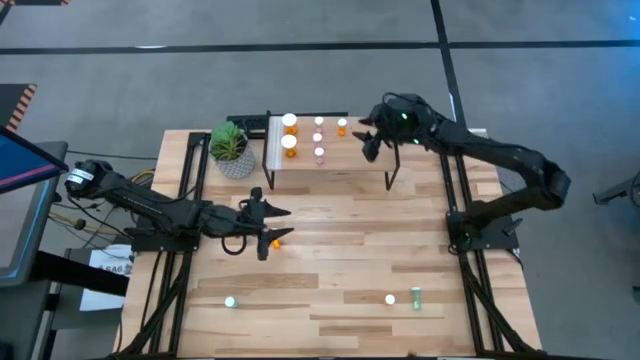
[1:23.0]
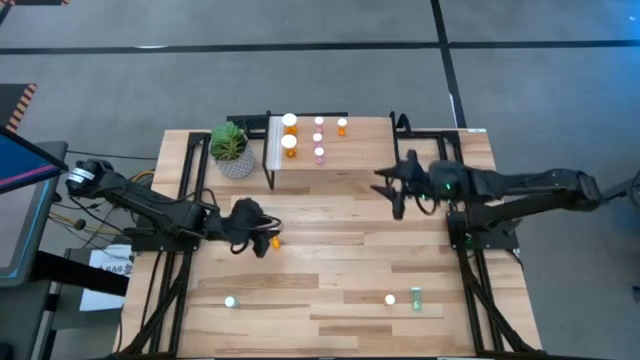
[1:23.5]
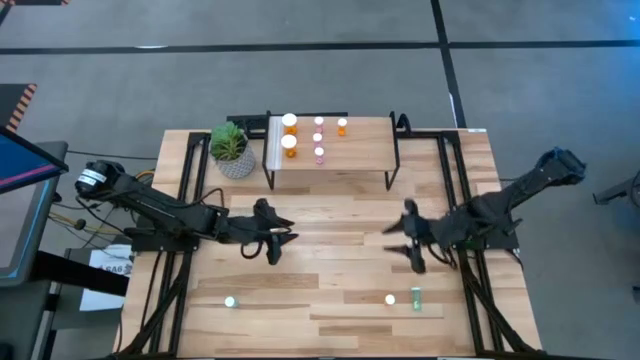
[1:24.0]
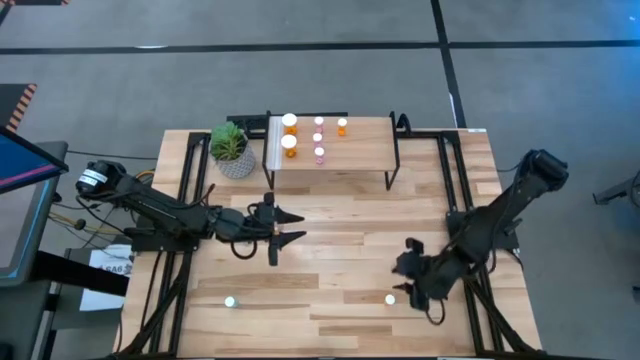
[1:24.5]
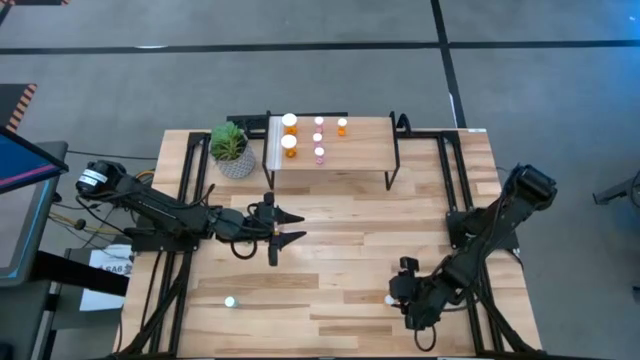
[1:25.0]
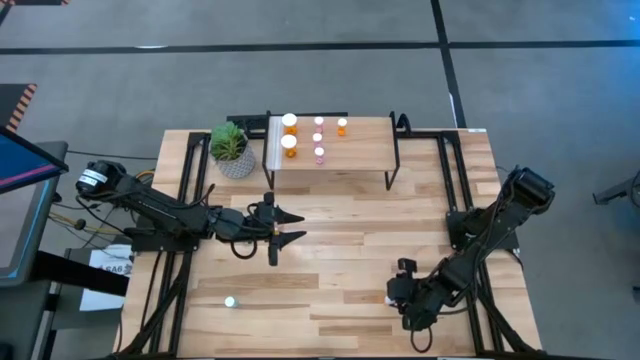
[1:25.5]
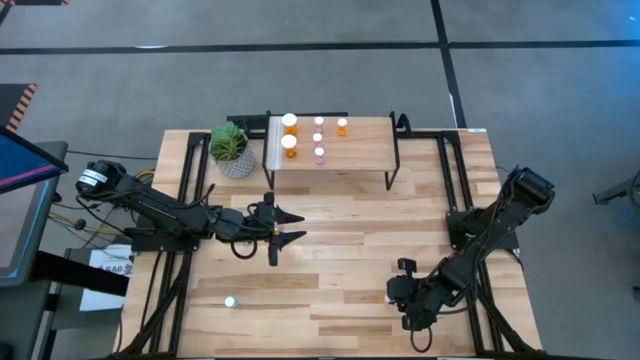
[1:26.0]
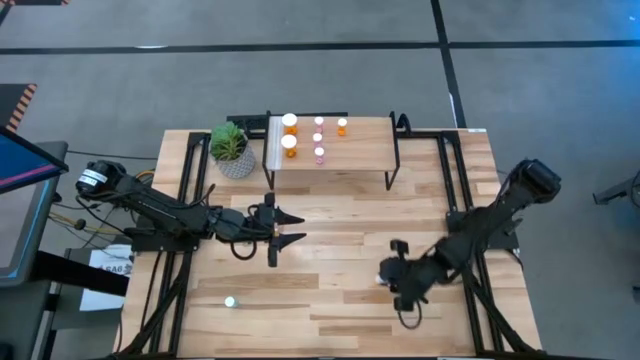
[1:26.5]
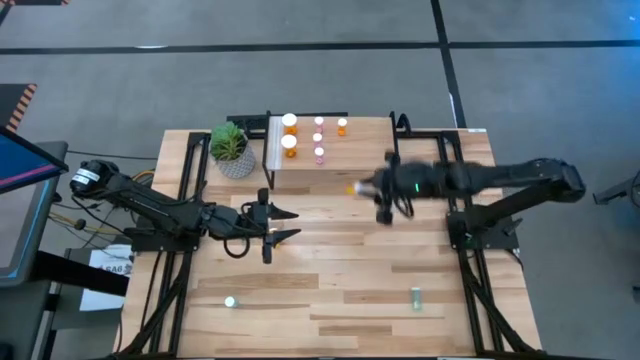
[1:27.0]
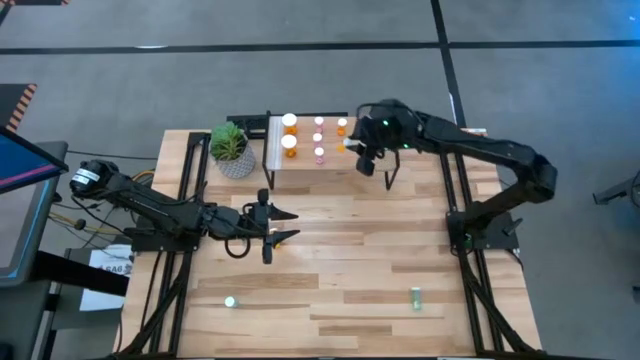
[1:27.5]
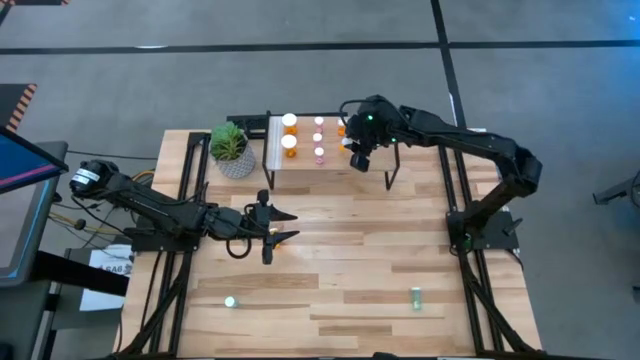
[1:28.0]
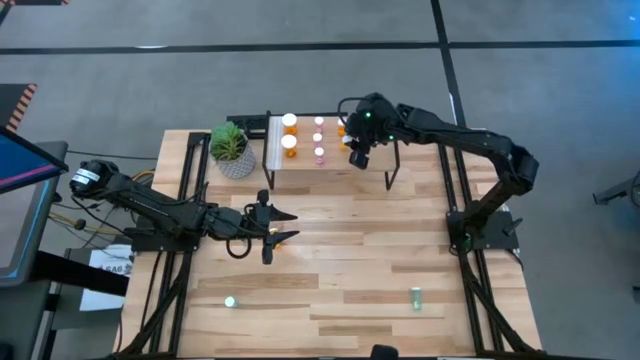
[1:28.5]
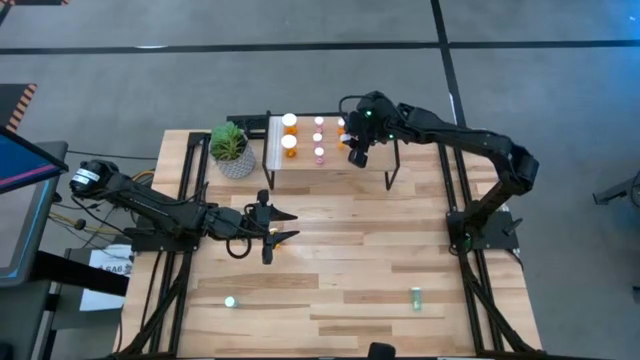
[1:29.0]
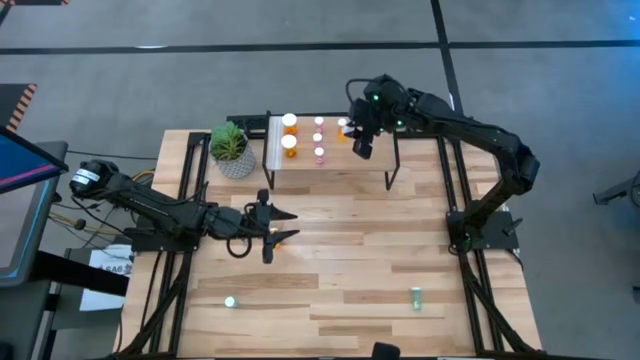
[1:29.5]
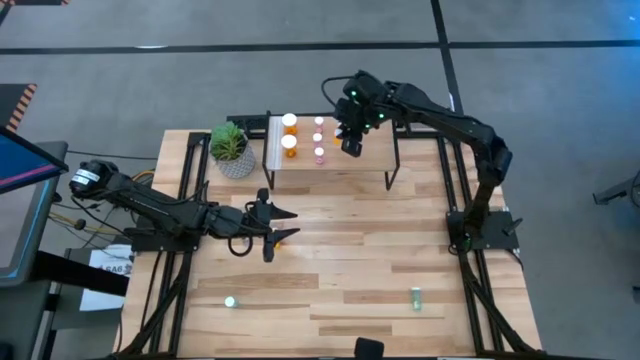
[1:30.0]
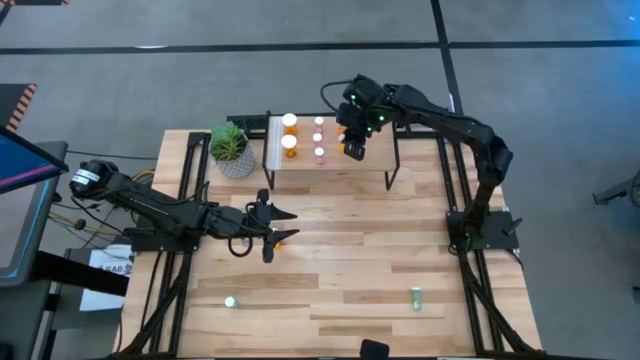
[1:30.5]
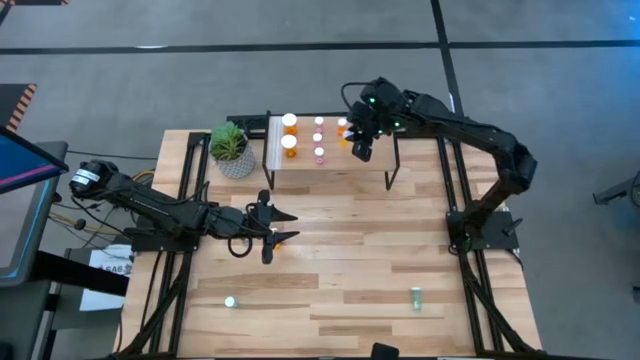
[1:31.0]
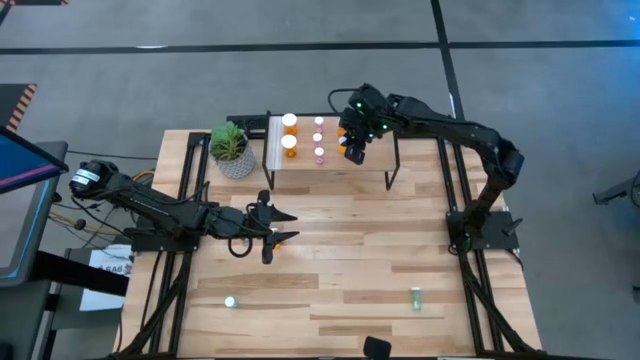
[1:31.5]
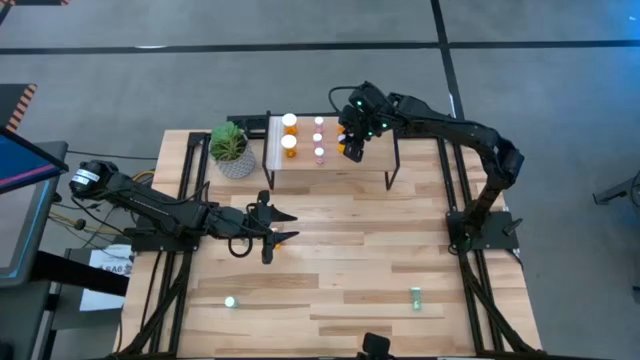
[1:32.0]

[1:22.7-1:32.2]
Task: Pick and place medicine bottles onto shelf by color
Put the small bottom orange pill bottle aligned with the other small orange pill bottle on the shelf

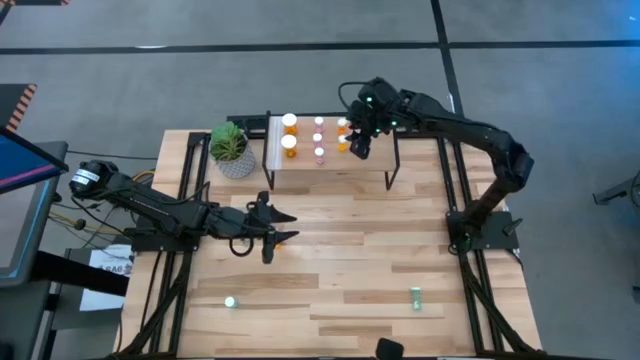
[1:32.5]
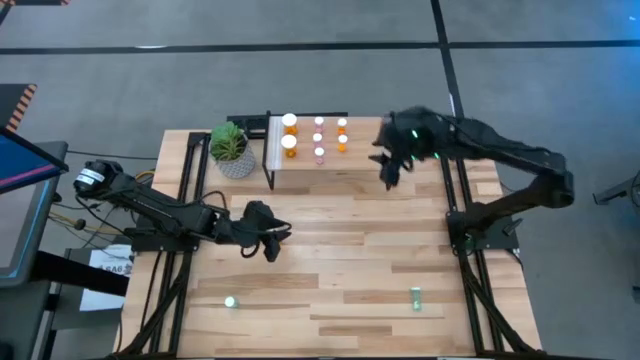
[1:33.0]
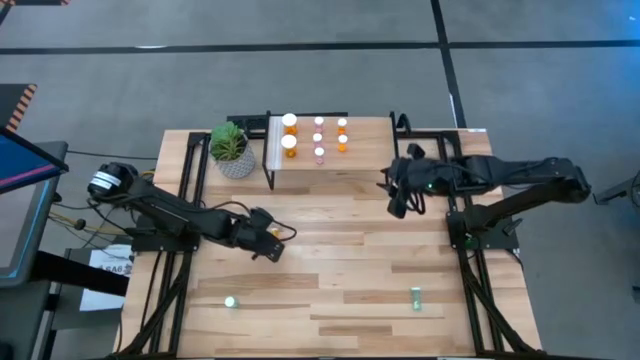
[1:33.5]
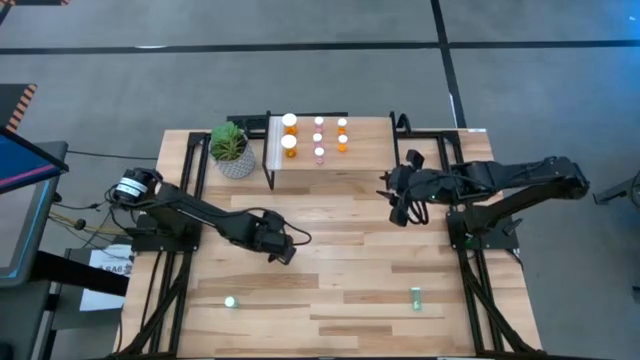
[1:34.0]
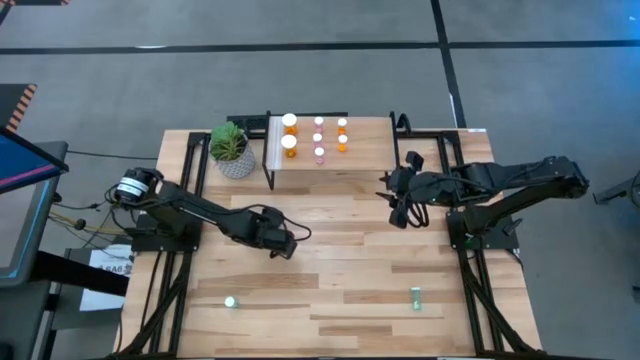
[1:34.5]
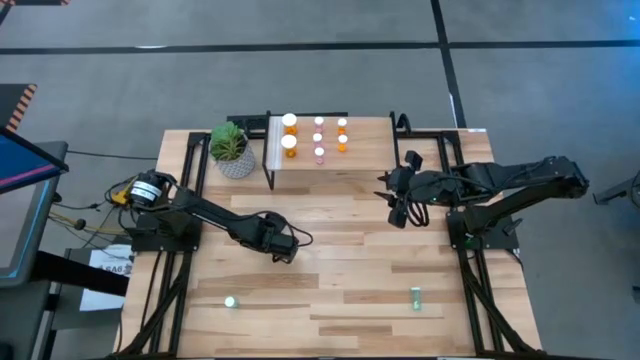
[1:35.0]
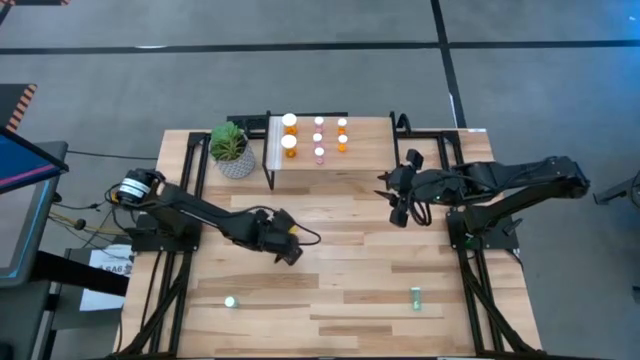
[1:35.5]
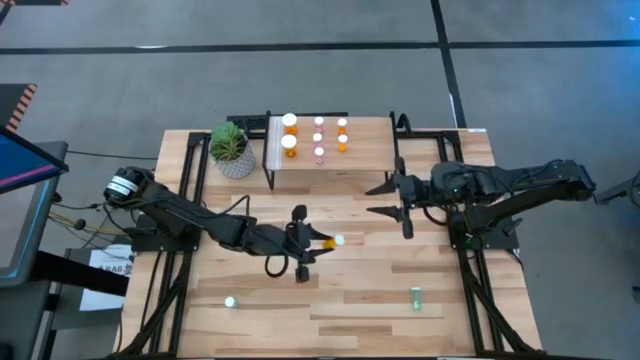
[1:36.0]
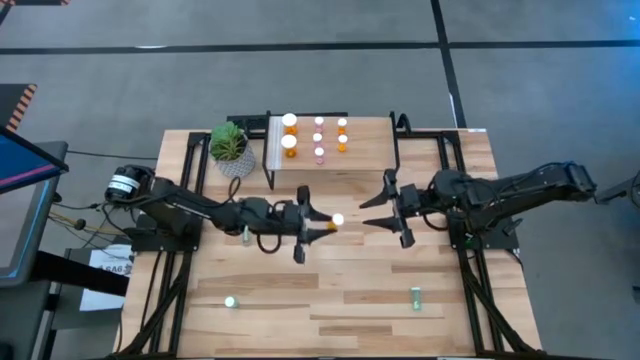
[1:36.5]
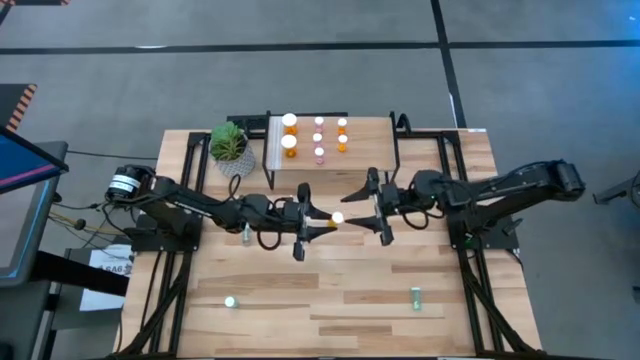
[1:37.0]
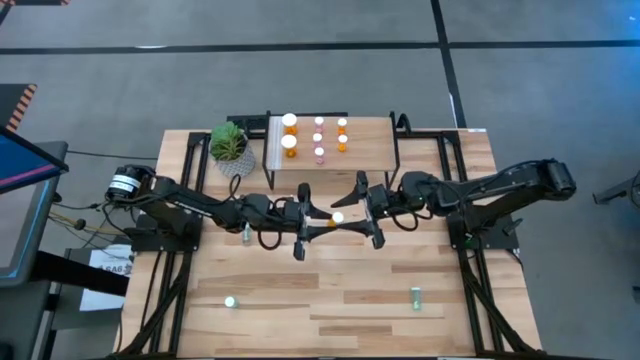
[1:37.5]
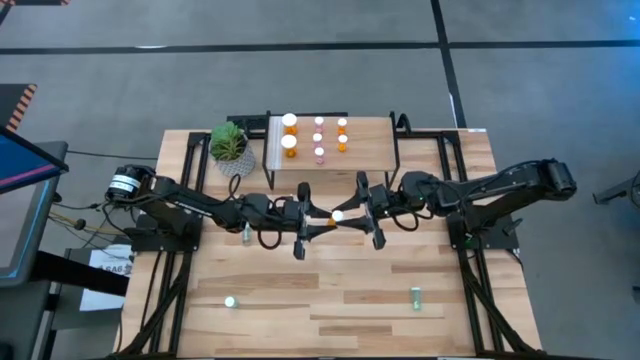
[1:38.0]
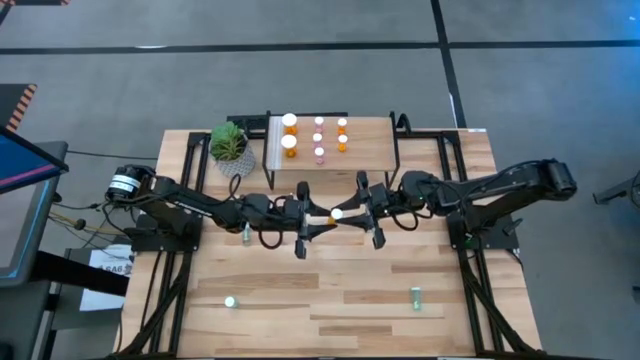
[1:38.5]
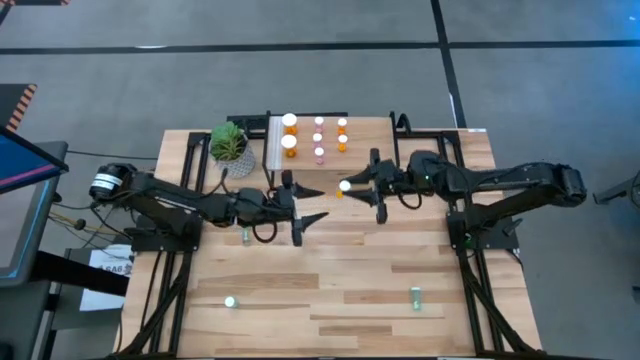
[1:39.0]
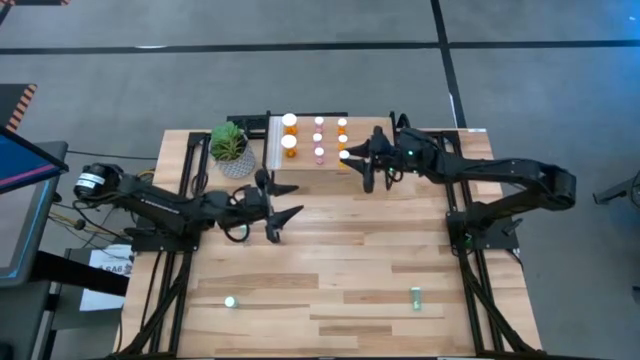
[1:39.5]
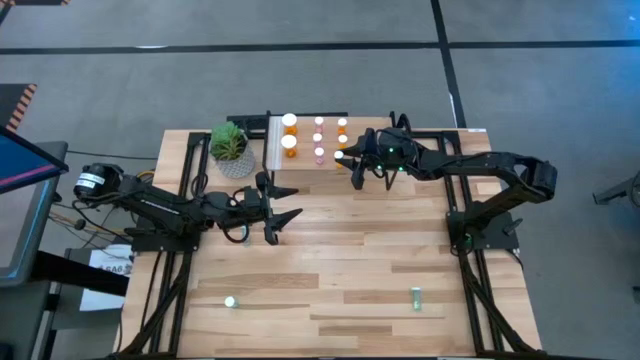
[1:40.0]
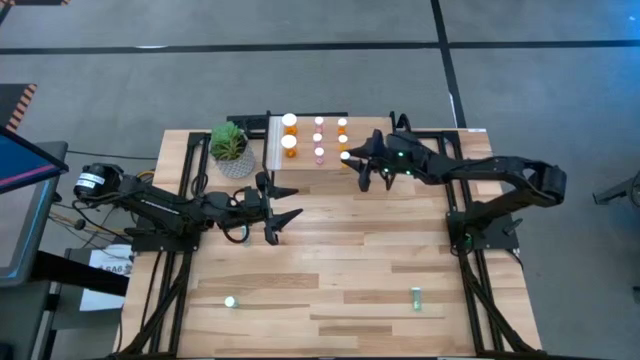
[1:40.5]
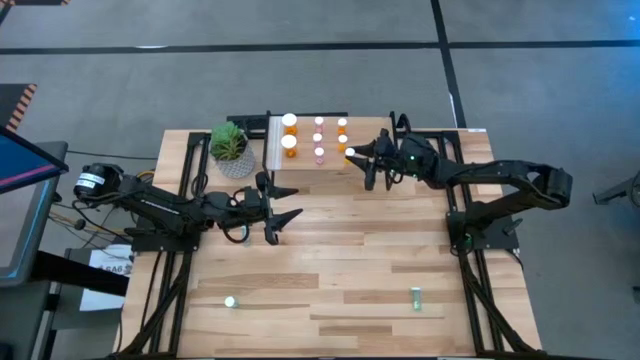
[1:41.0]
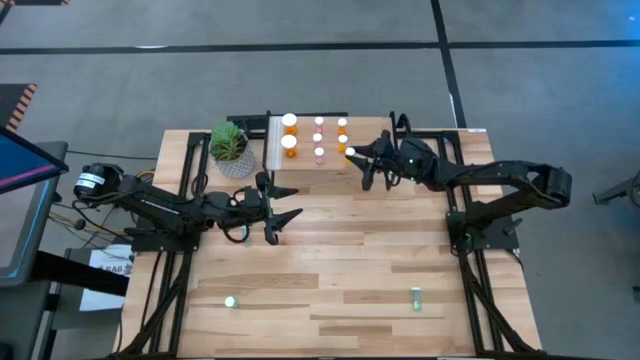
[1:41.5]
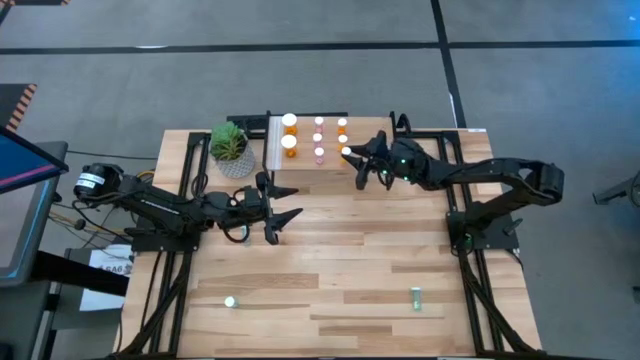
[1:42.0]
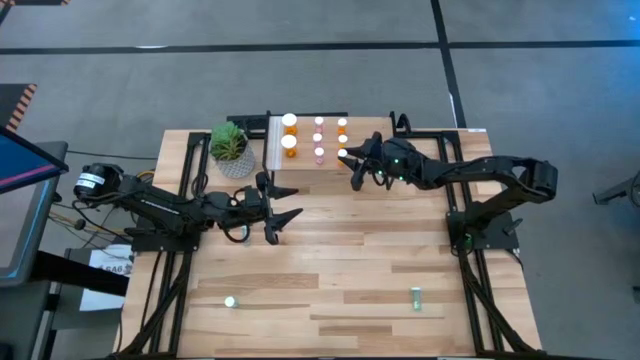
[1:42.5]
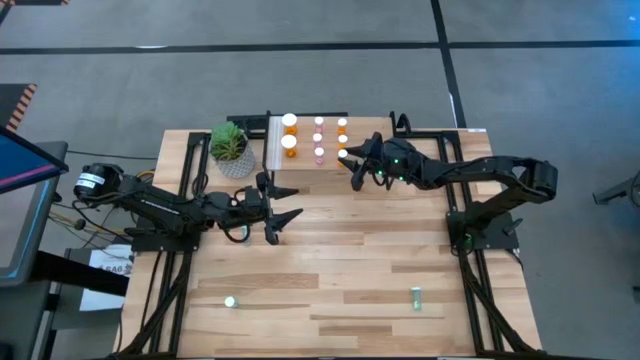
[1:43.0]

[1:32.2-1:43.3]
Put the small orange pill bottle aligned with the other small orange pill bottle on the shelf

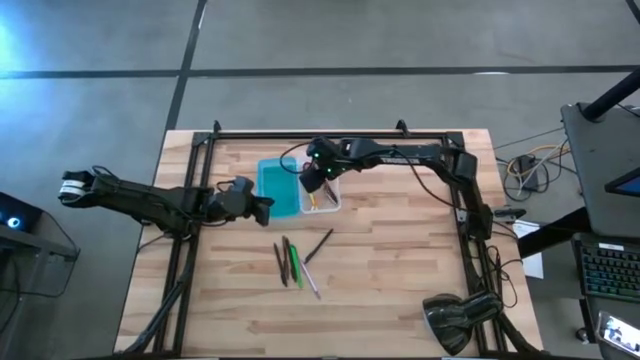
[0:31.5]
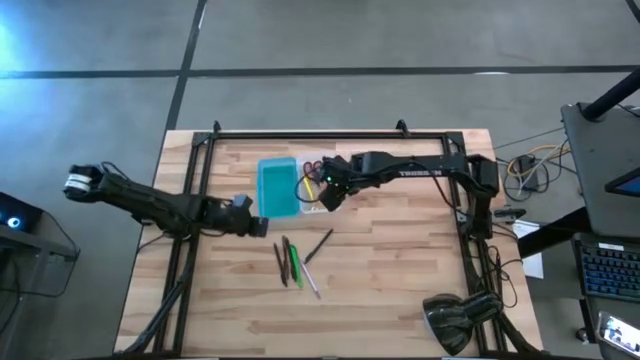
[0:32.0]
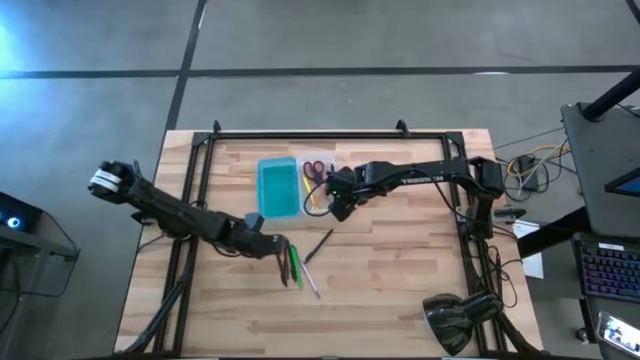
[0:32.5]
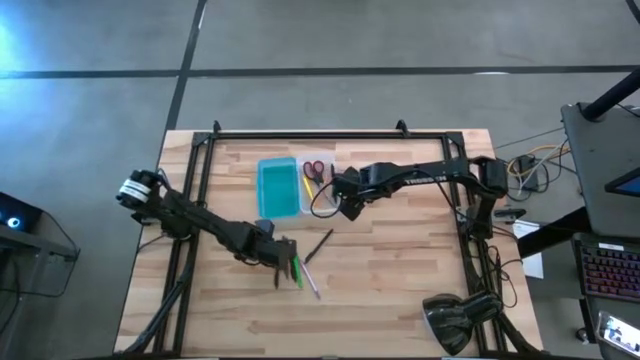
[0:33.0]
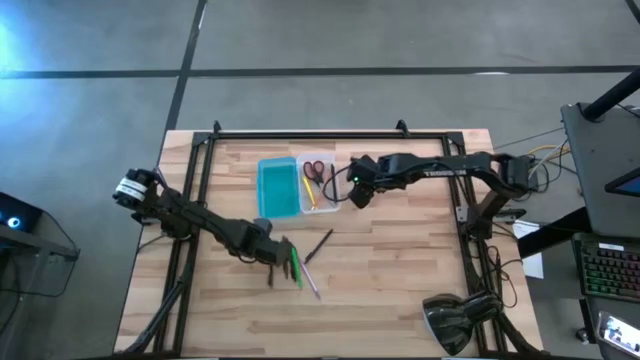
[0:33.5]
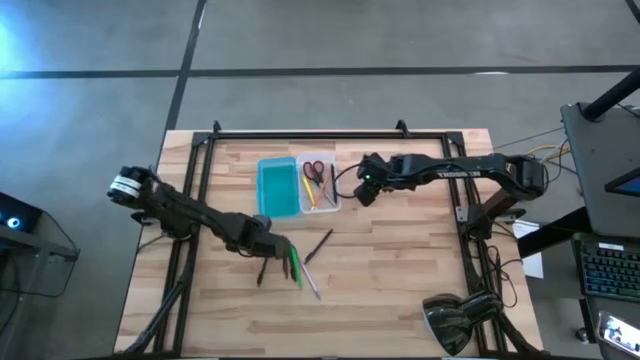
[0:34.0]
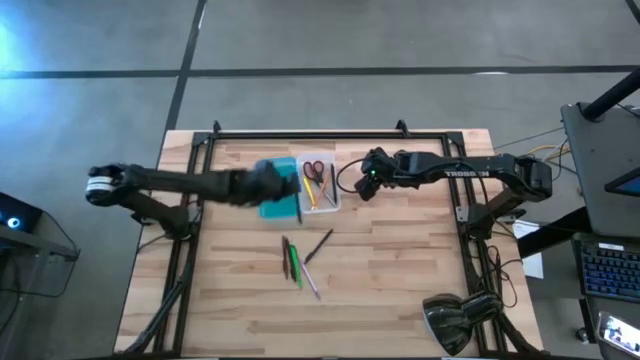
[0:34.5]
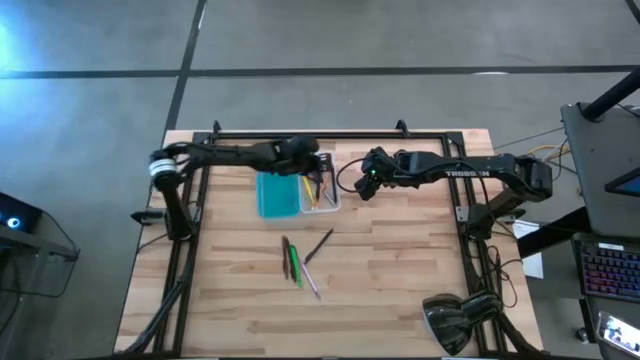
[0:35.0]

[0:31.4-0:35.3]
Task: Pick & place school supplies into a supply box
Put the black pen into the pencil box
